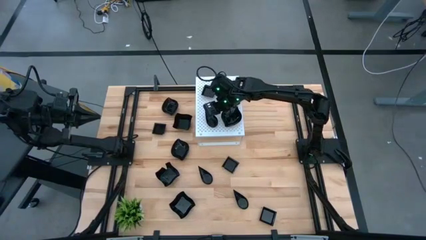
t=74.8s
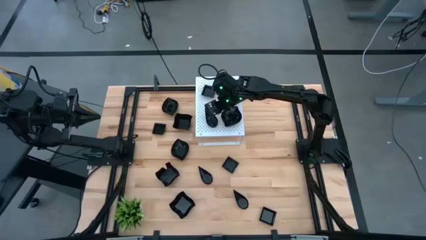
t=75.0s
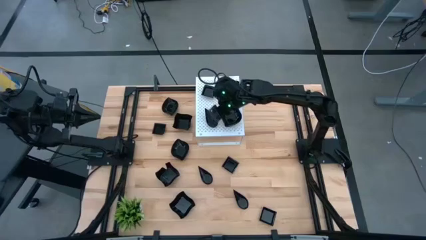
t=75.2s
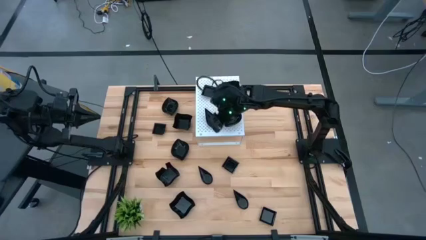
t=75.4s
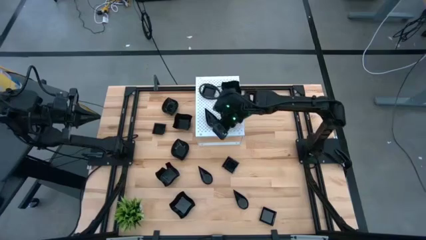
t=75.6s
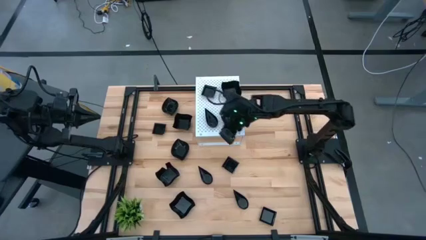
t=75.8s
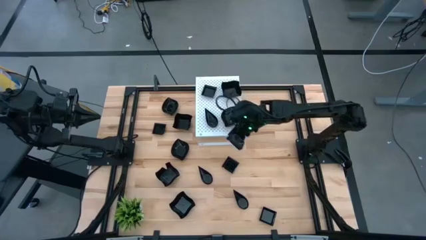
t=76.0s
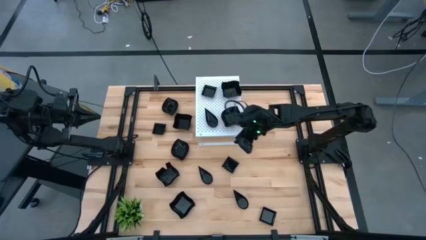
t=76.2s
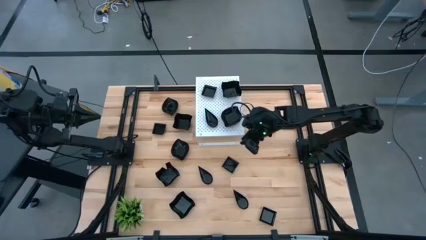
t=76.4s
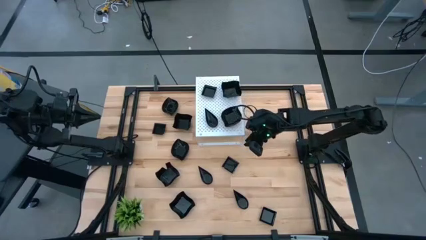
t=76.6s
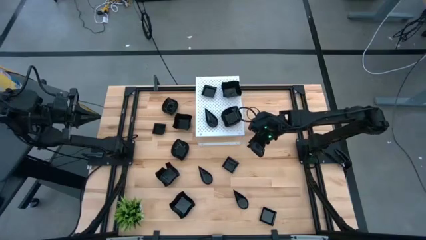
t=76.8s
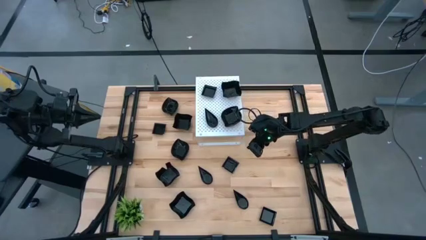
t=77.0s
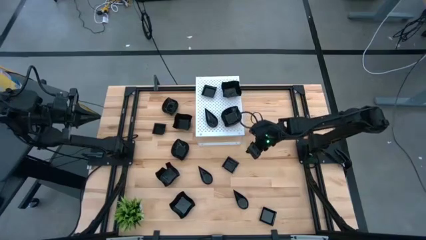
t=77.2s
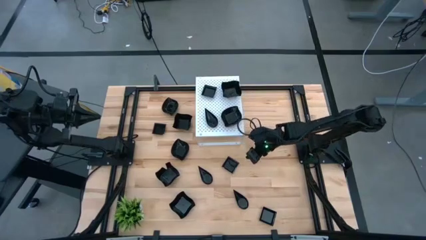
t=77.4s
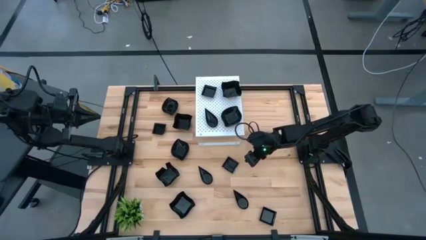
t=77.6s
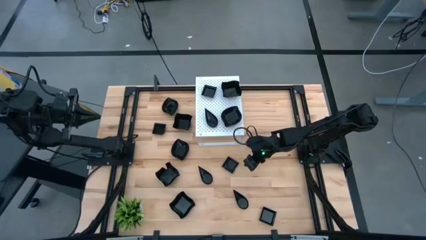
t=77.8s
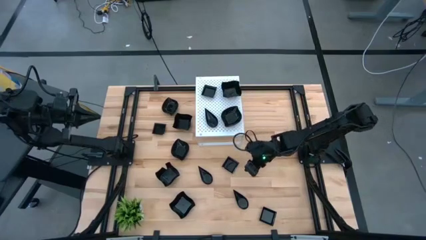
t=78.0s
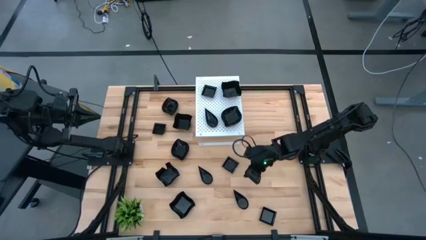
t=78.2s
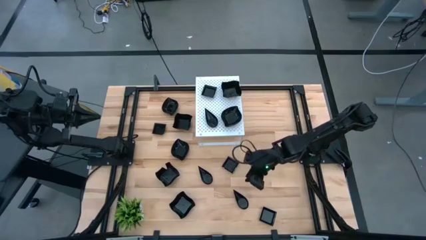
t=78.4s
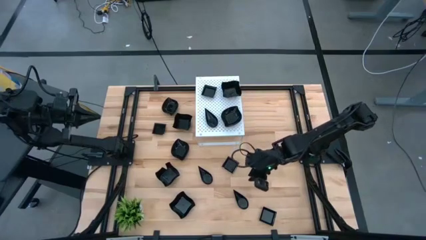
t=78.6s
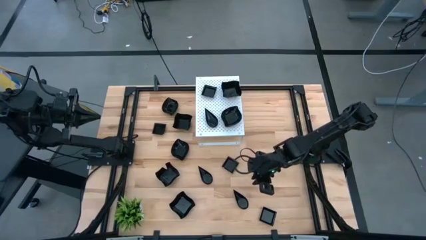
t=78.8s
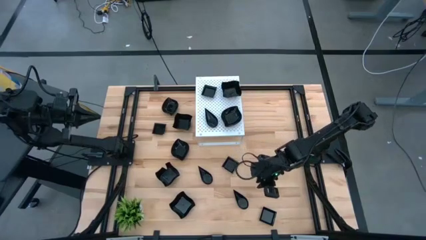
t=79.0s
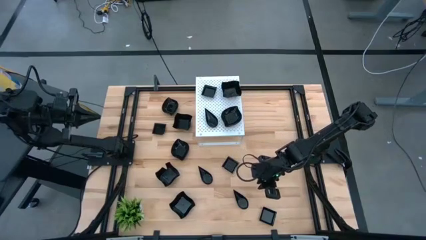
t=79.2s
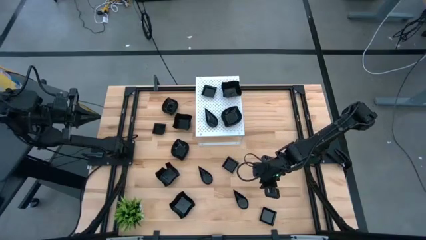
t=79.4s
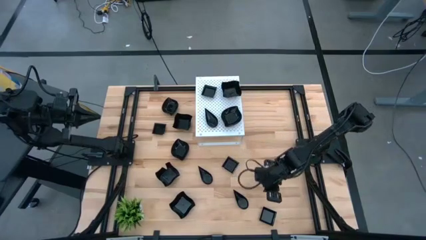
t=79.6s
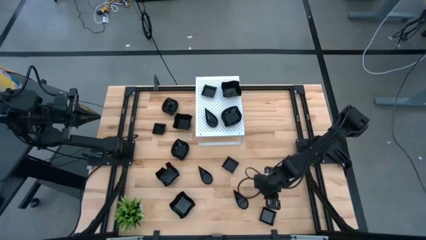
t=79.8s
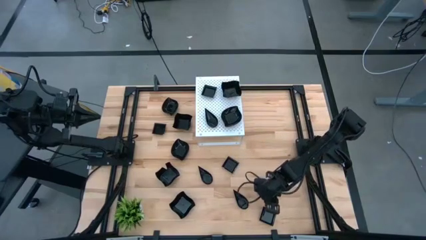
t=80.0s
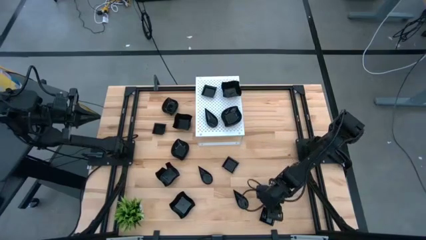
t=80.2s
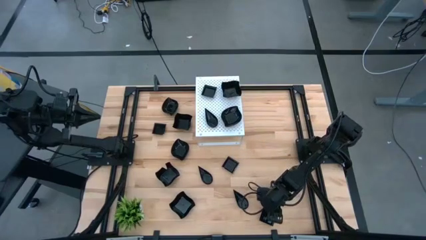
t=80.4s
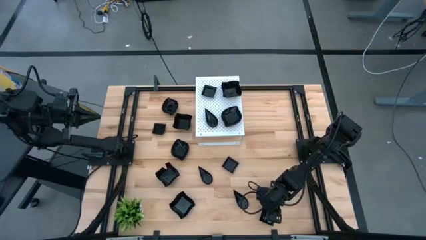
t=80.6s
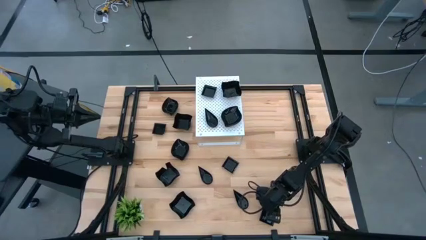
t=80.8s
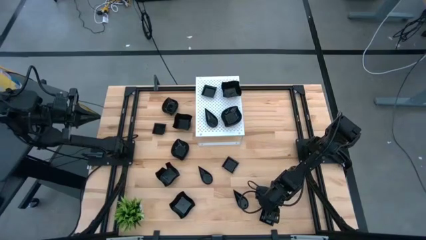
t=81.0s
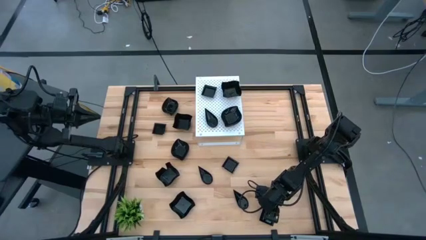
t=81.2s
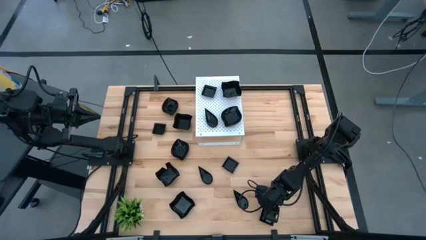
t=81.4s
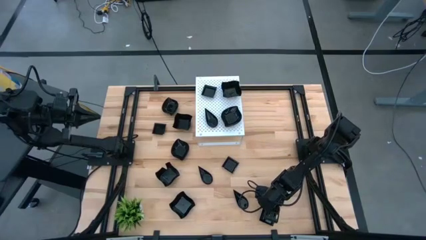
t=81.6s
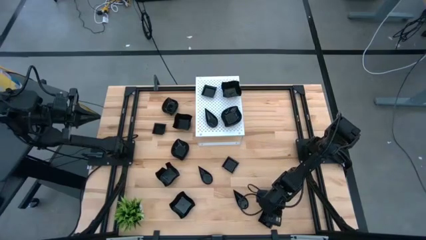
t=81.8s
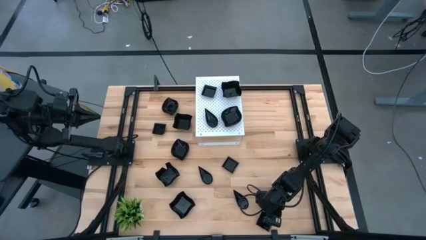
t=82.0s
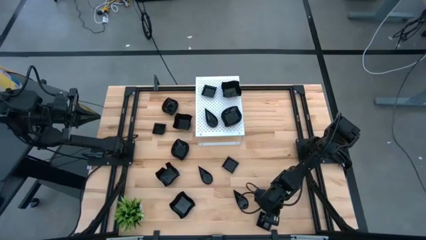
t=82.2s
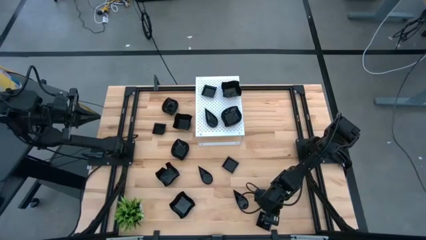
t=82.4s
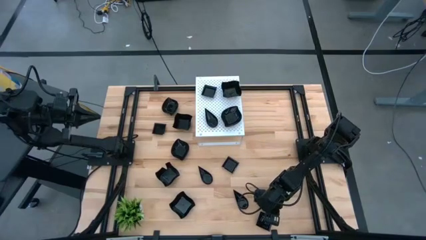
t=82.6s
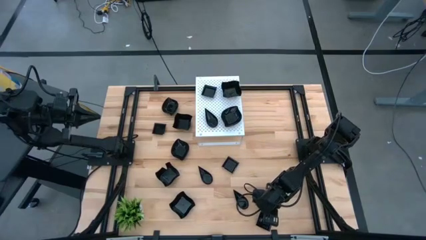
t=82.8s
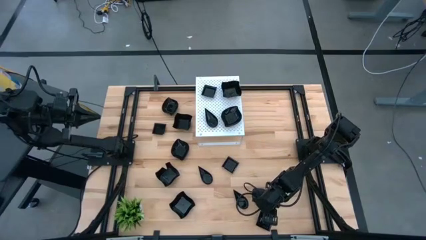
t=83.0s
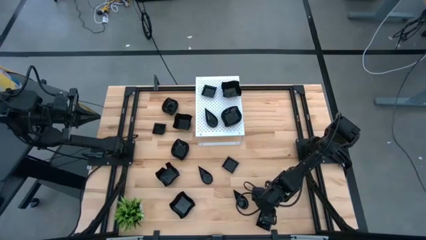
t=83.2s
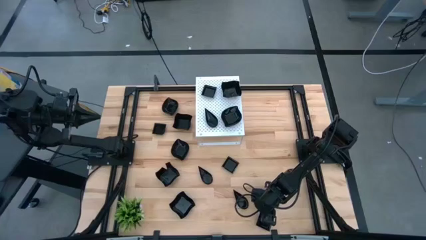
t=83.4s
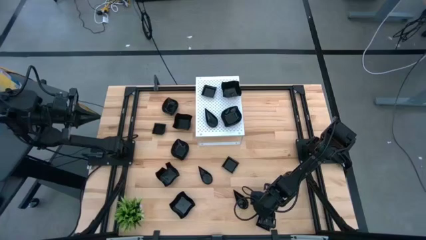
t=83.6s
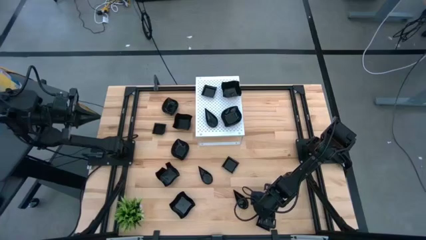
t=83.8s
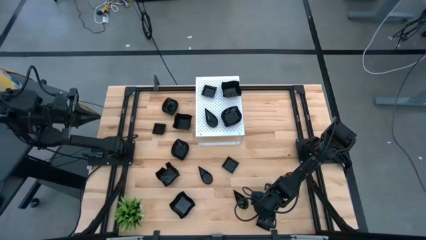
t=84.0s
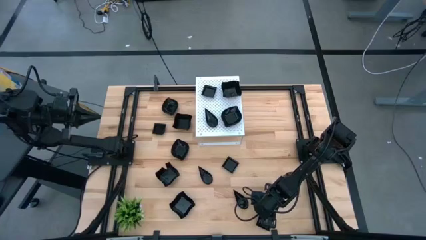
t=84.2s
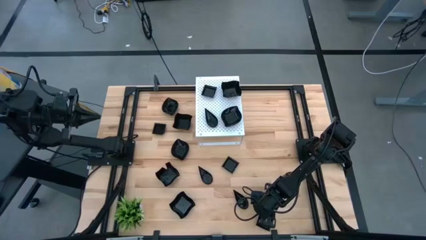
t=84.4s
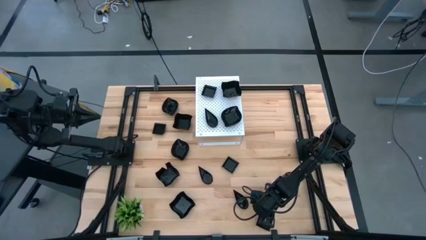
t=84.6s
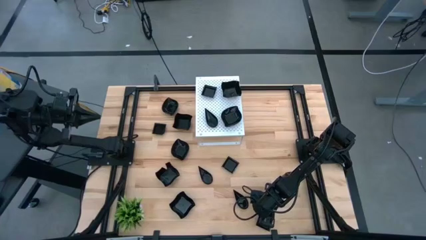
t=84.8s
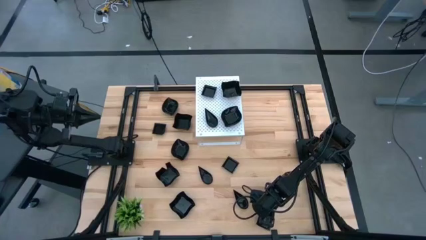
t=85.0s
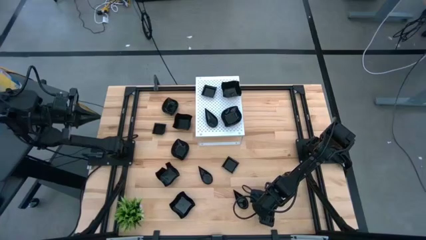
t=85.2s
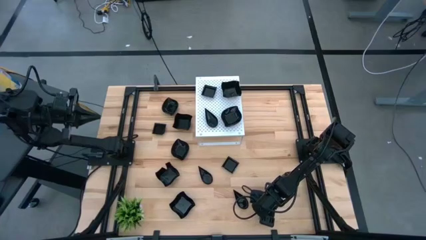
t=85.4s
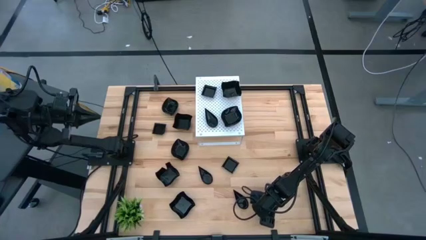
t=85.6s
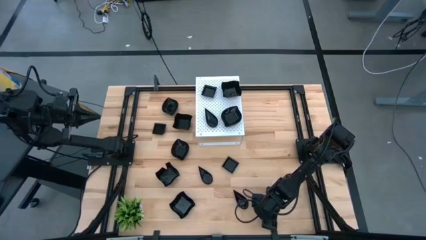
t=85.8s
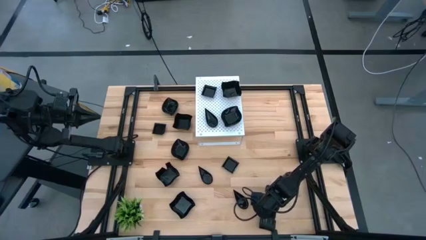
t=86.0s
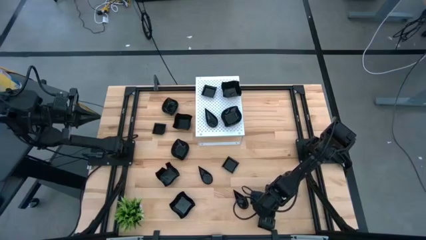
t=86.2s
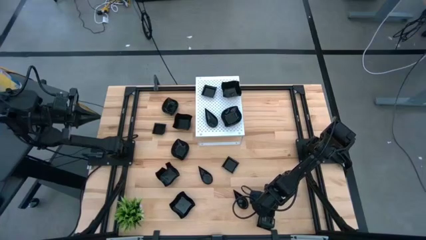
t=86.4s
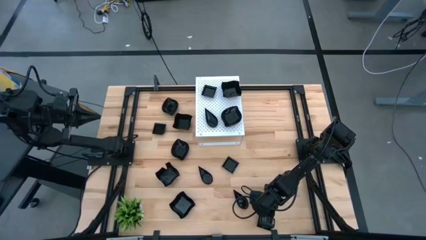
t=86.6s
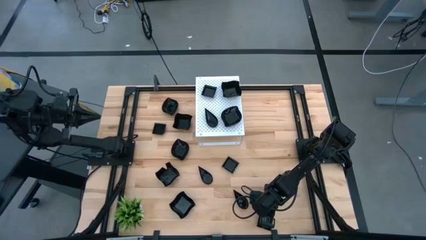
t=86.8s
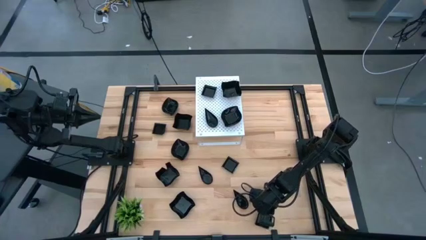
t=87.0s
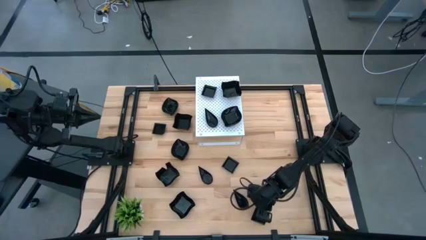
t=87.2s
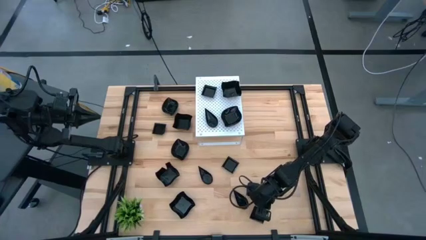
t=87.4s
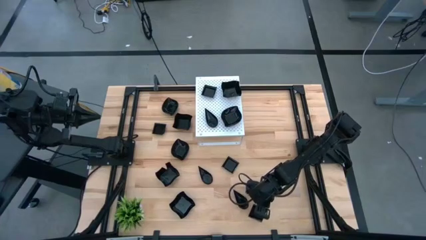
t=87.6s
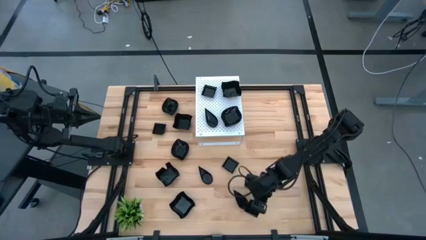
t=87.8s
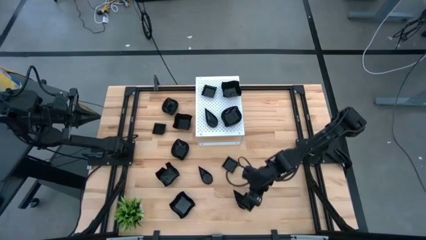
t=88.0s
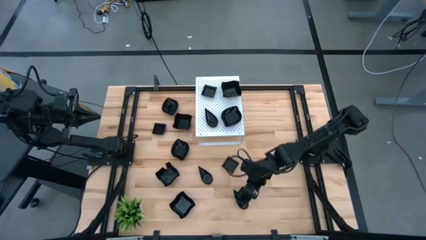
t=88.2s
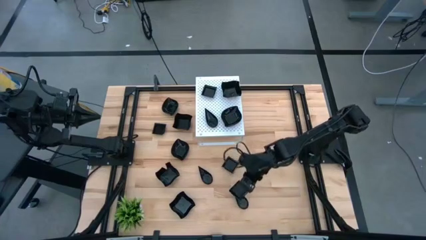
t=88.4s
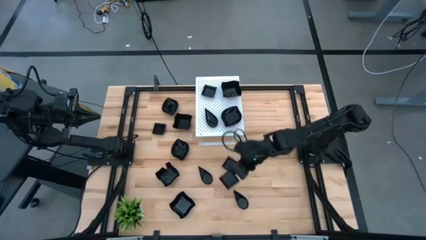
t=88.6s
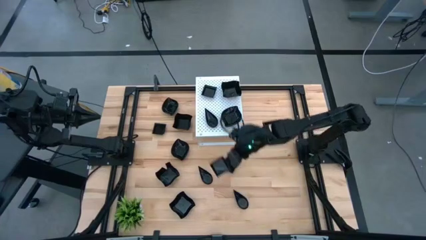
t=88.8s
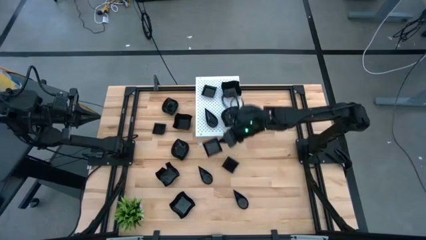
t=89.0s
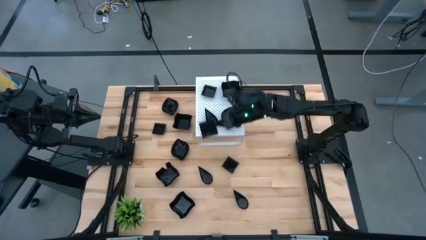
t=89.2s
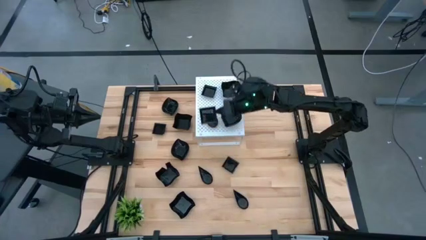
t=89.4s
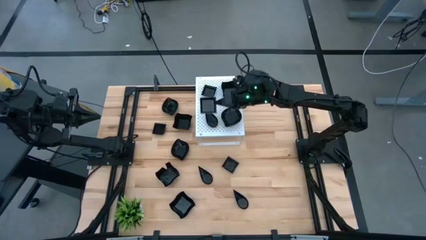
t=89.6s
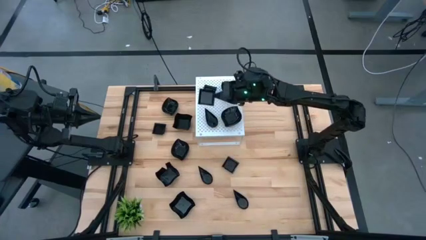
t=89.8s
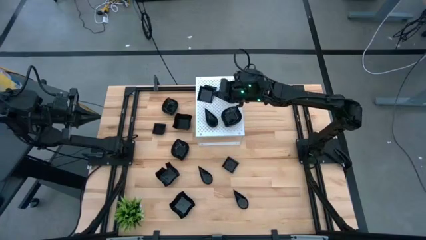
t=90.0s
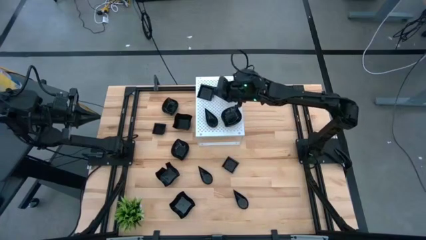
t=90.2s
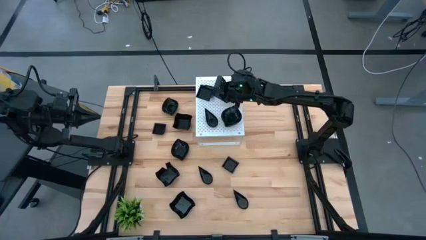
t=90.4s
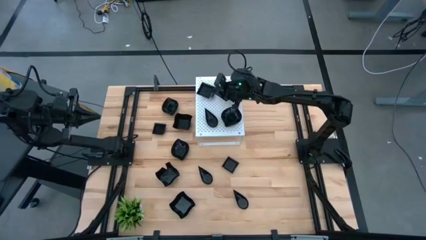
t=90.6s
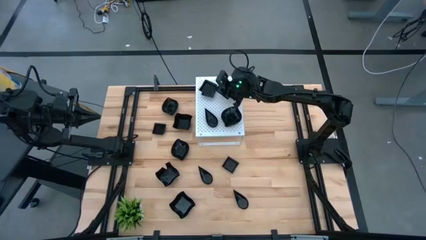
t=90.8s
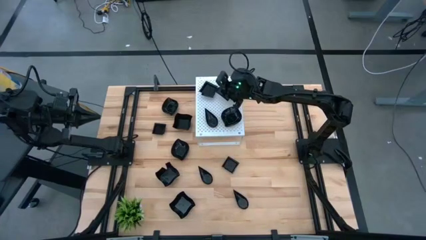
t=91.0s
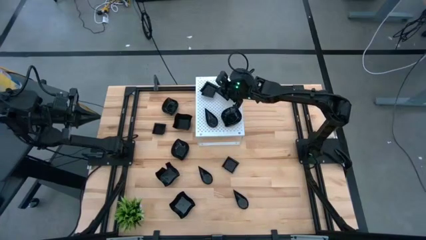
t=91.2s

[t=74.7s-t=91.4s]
Task: Pick & Place Mini shaped plates
Stack the square plate on top of the square plate on the shelf
